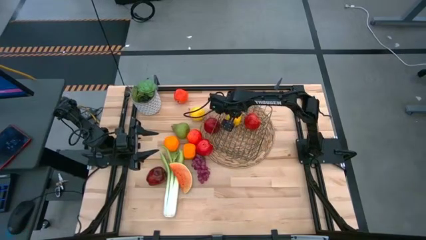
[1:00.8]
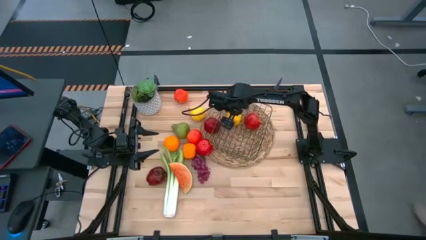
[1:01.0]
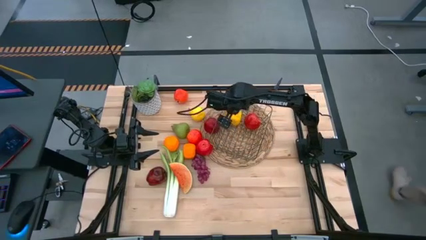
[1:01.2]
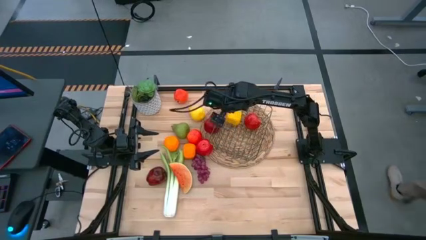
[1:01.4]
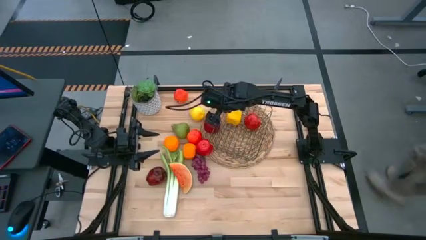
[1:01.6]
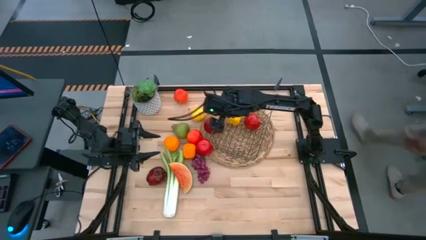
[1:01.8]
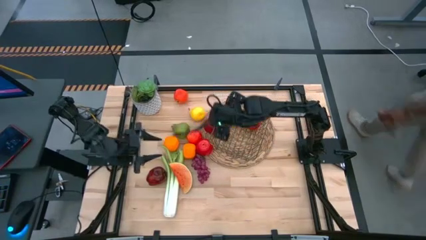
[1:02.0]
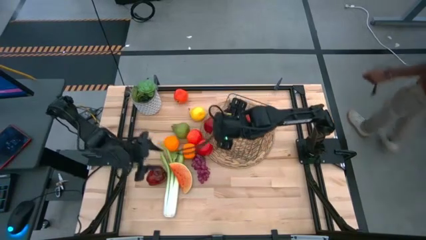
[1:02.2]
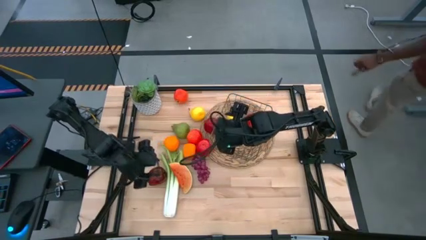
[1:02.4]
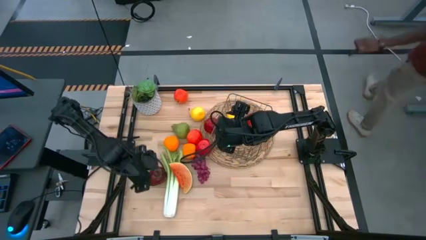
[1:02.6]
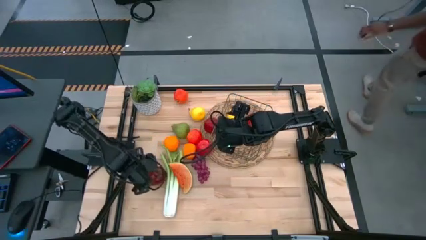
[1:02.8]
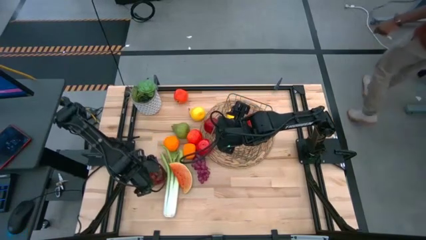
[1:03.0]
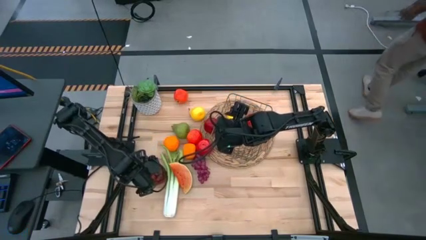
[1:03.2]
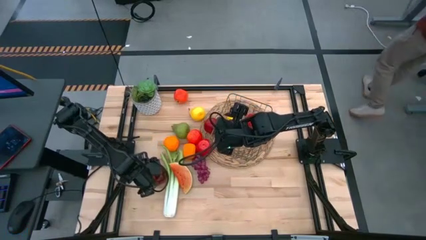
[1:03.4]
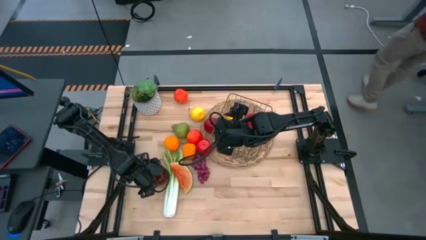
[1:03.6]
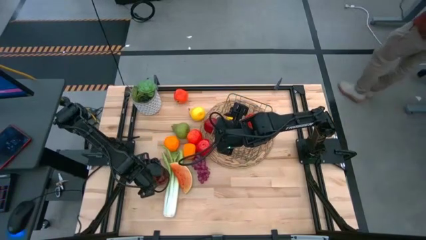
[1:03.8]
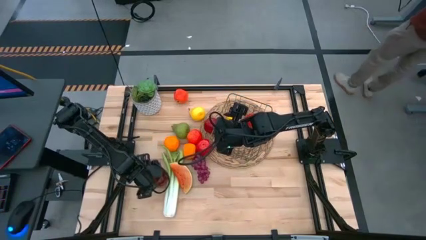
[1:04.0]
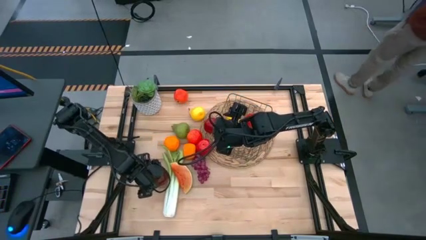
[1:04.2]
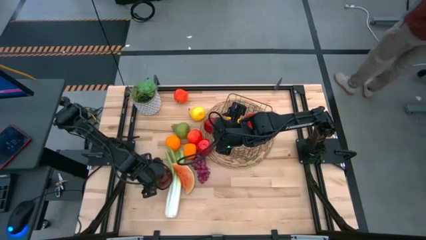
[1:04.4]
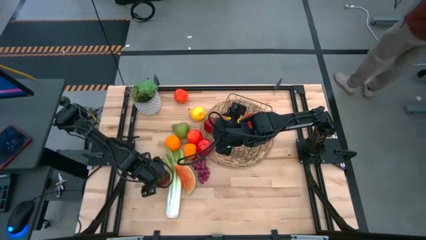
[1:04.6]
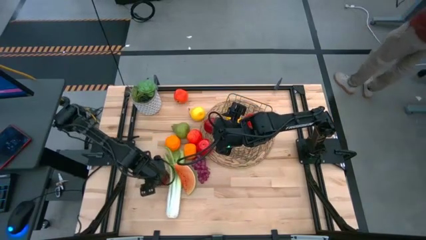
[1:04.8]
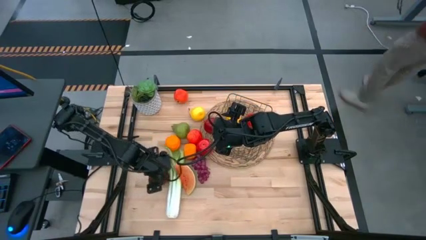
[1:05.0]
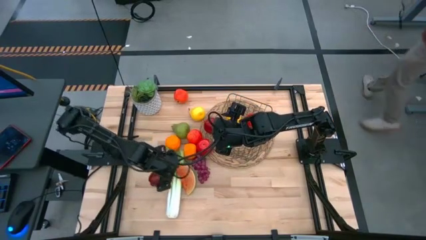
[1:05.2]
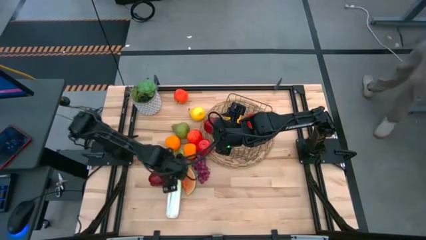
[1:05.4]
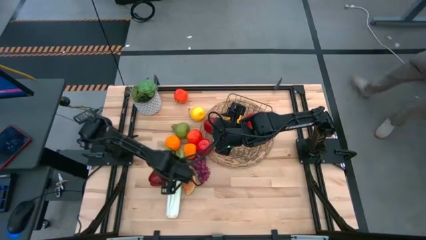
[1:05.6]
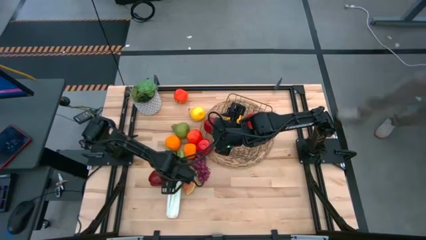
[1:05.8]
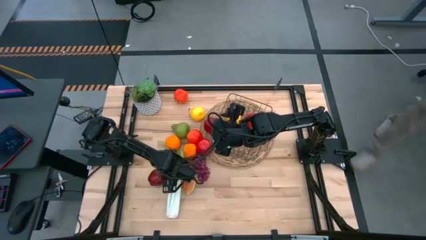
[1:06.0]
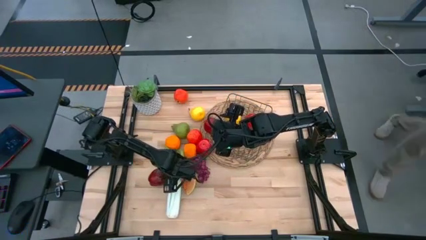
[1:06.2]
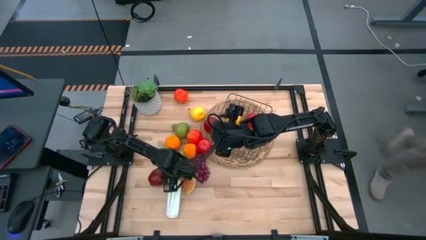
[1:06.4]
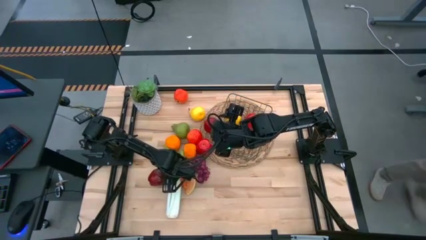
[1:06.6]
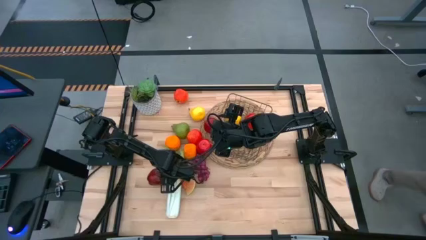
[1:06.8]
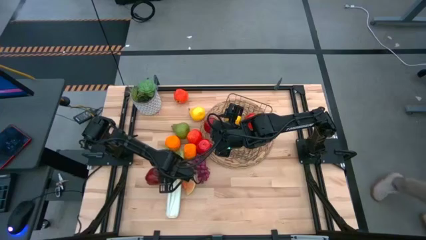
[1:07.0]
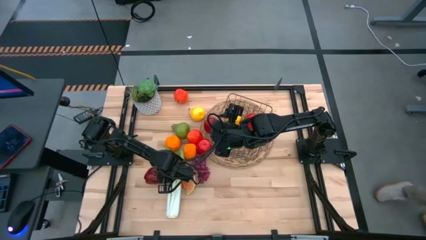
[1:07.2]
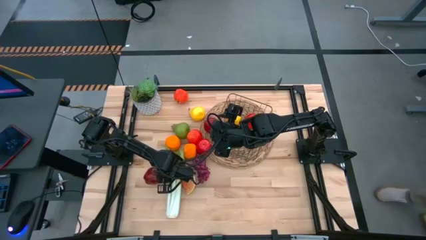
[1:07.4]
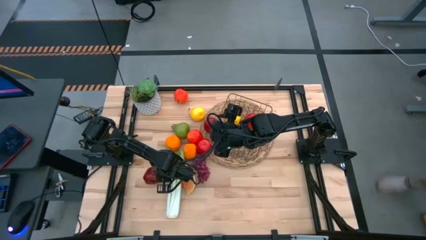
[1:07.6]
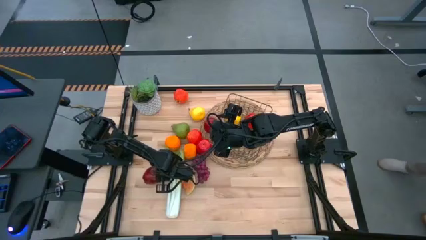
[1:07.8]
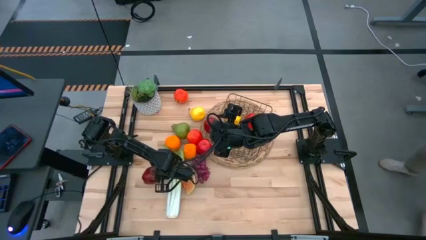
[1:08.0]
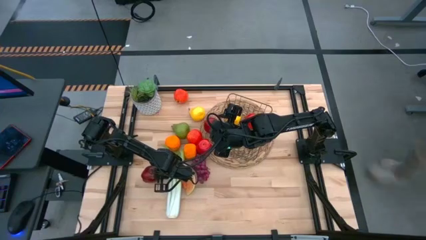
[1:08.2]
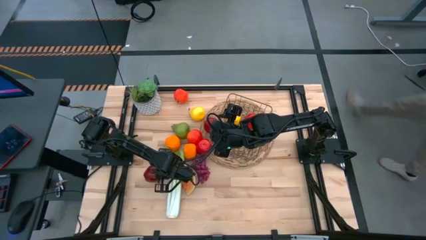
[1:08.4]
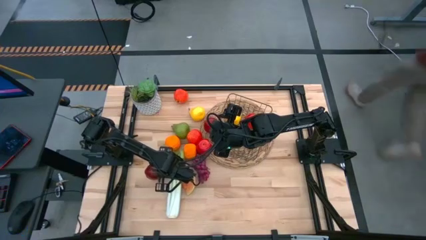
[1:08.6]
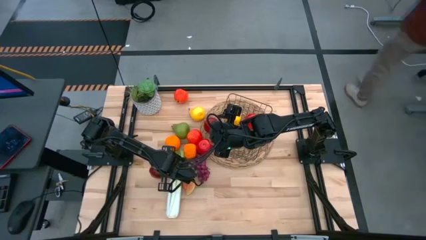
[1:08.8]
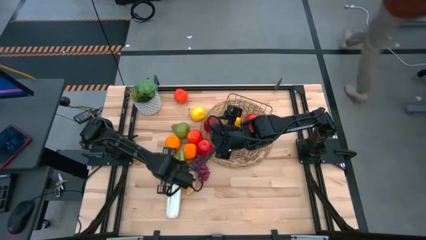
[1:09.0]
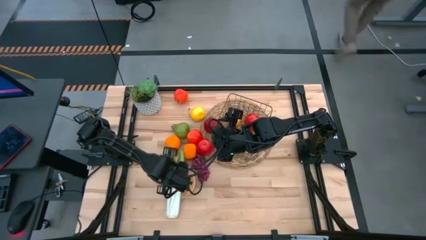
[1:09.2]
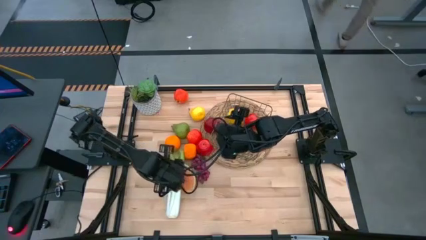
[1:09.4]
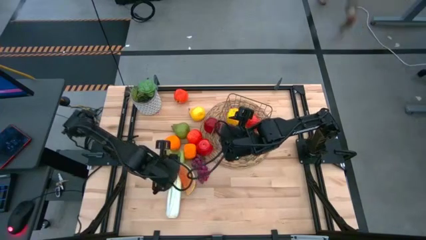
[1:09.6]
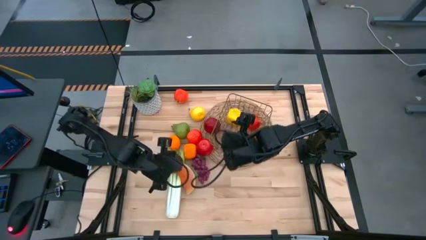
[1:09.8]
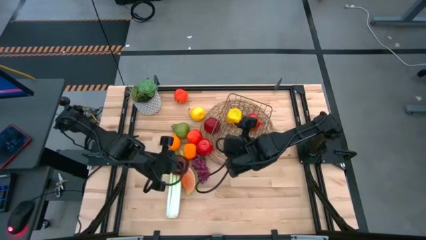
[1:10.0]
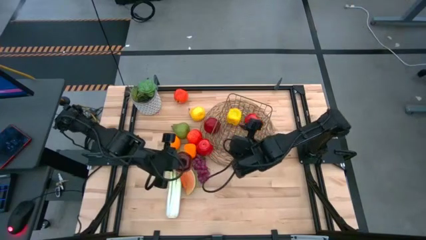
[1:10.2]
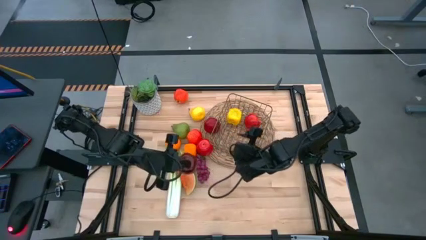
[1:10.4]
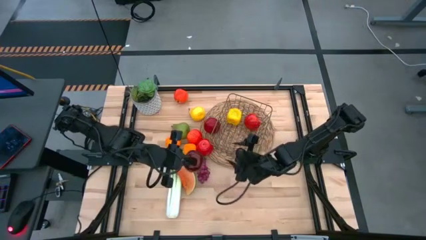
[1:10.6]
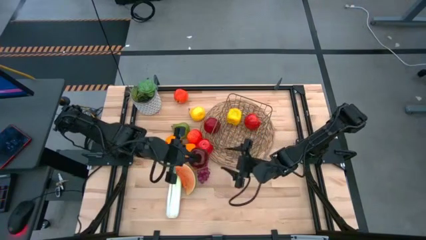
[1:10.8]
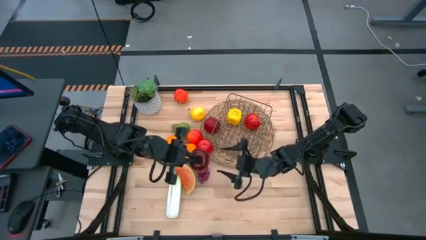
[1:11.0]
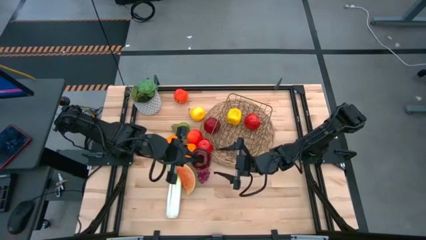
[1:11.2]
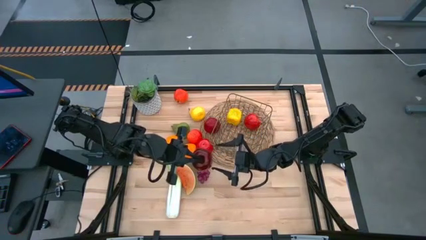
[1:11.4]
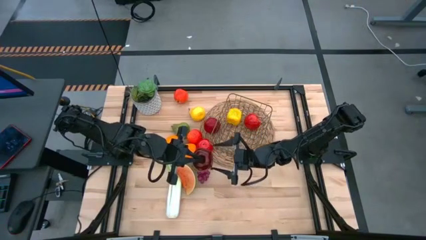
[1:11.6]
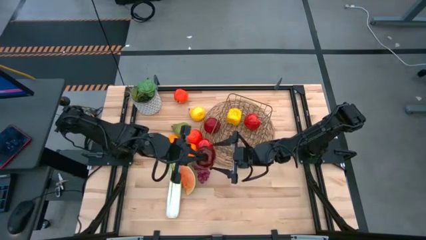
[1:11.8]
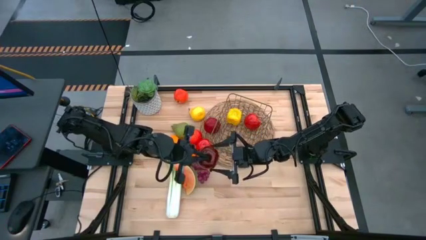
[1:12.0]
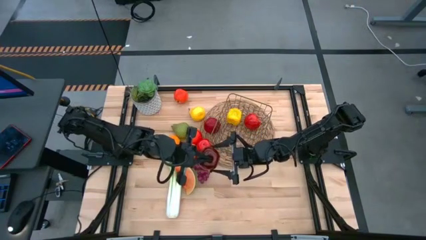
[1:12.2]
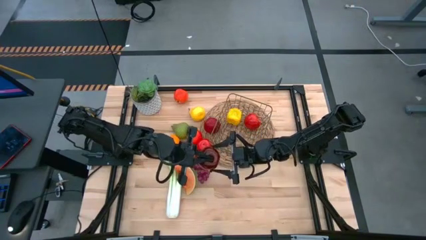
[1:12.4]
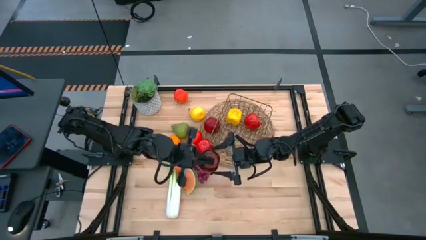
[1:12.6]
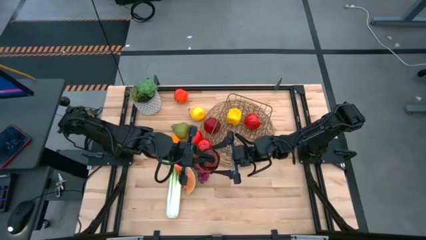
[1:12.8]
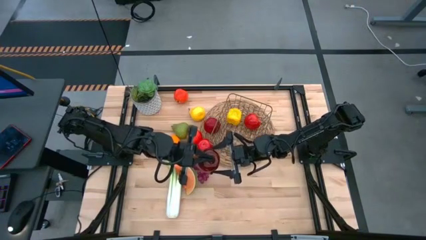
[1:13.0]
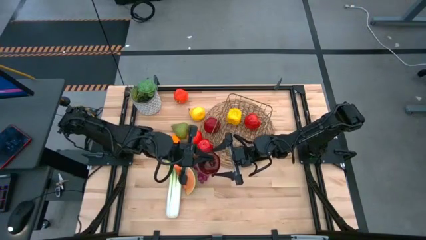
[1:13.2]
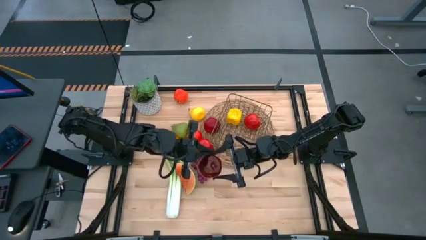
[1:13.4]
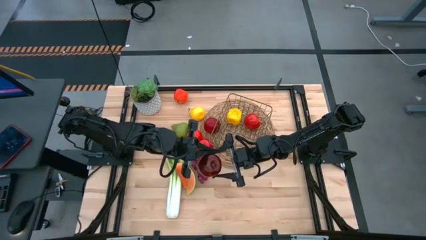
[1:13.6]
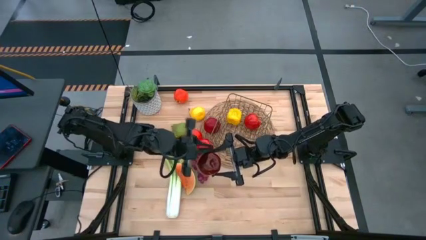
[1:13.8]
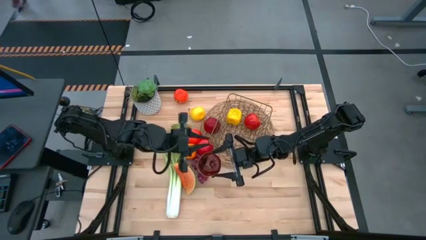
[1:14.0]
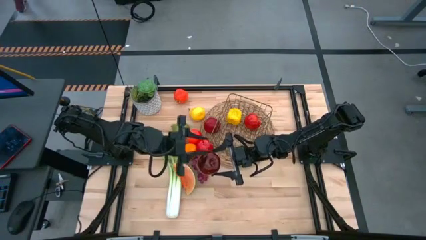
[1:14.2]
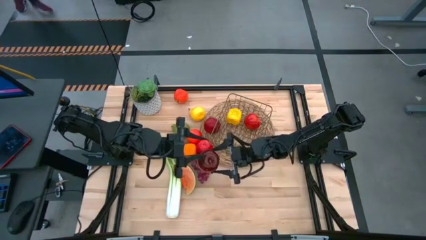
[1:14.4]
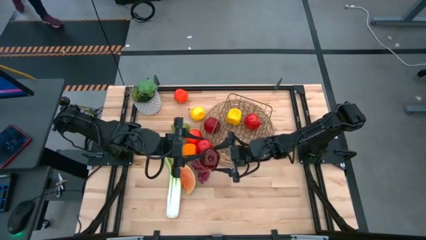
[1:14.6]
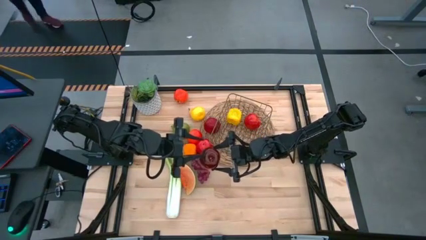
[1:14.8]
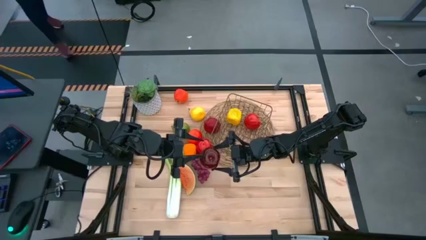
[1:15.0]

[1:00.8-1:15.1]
Task: Build produce basket
Put the red apple into the gold wire basket

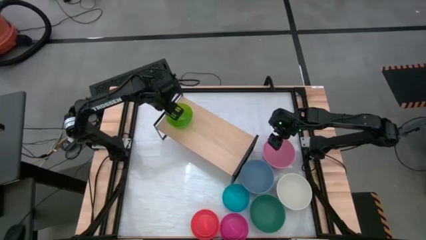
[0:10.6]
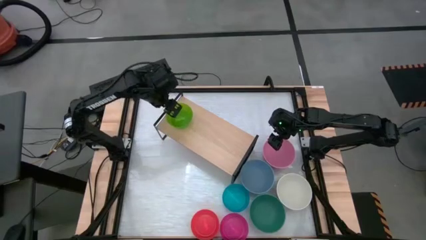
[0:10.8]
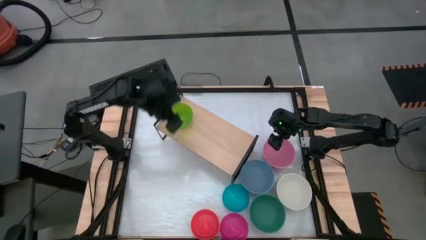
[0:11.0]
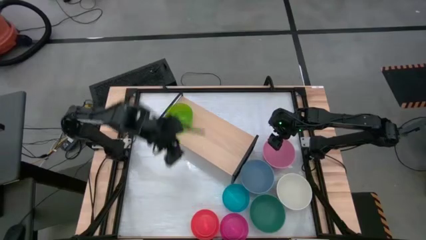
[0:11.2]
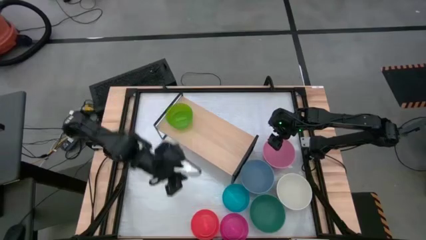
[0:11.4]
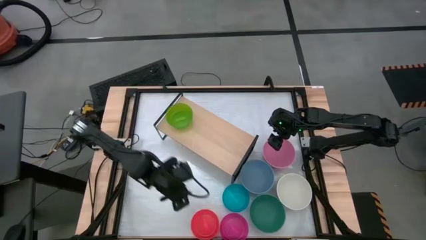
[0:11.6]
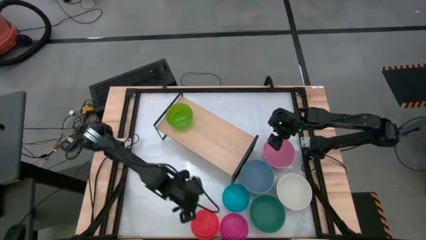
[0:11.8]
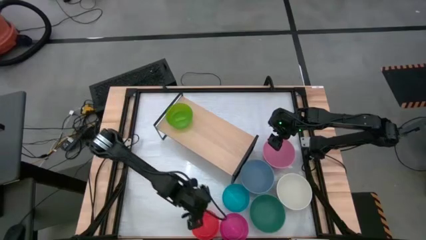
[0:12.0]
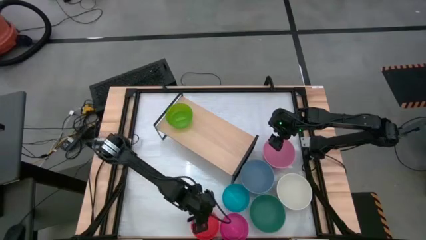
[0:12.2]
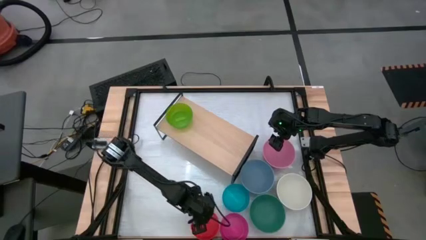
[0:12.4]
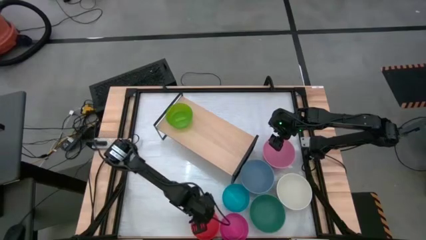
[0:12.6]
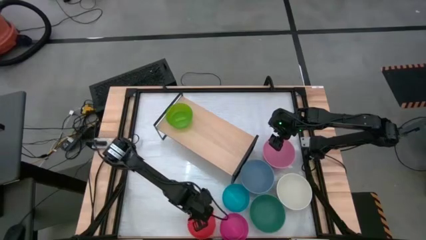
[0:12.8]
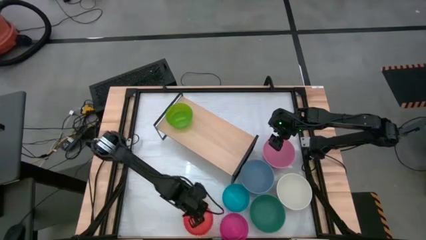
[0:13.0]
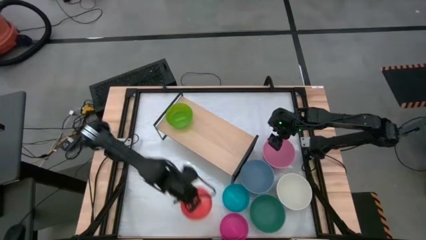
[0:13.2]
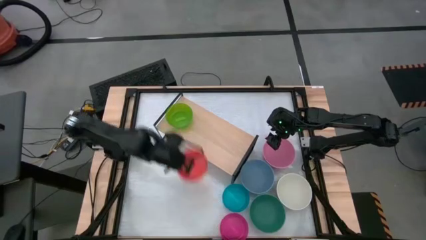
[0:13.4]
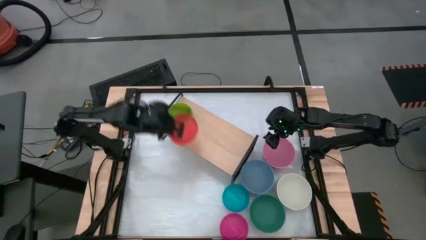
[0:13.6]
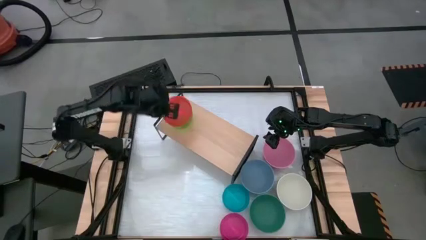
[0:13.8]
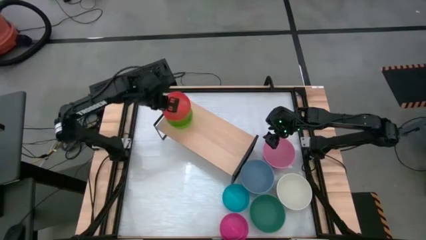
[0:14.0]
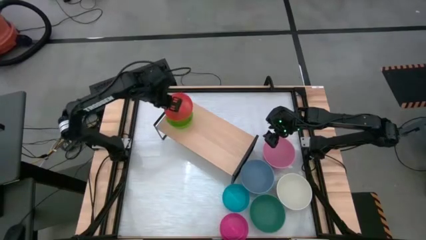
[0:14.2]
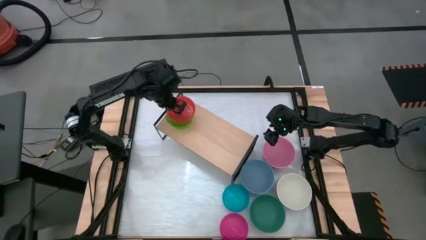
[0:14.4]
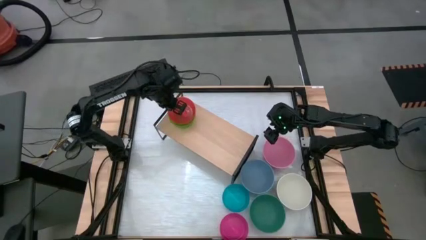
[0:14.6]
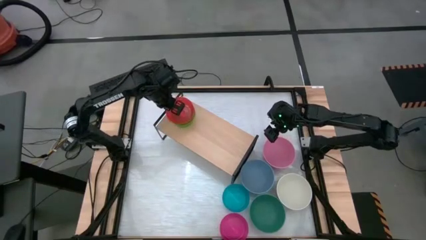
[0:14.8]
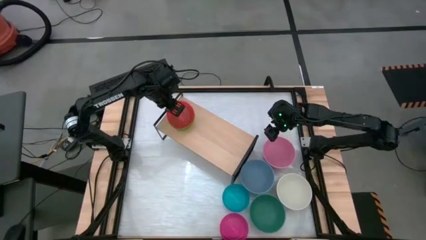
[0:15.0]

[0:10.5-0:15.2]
Task: Place and stack bowls onto a shelf
Stack the small orange bowl on the top of the small green bowl on the shelf
